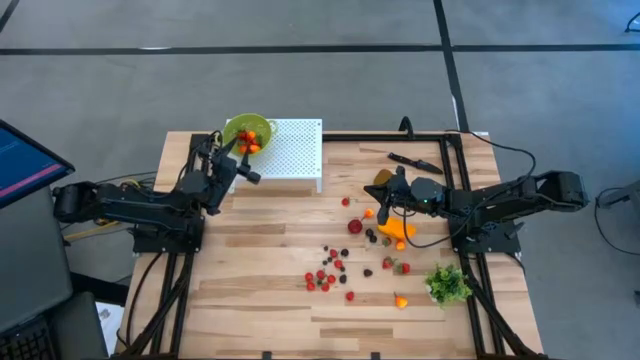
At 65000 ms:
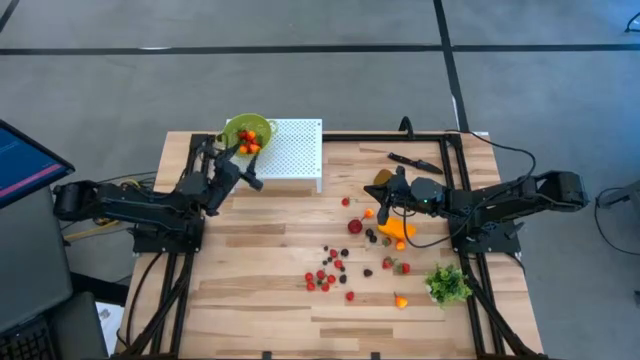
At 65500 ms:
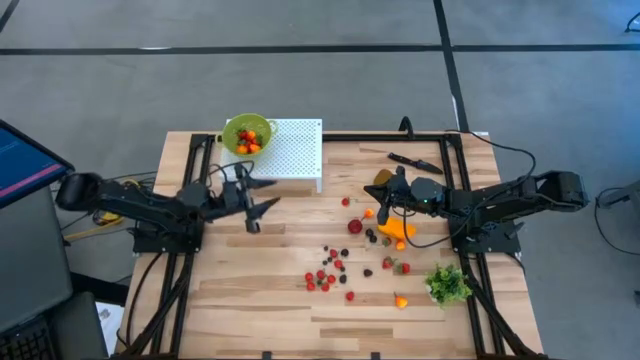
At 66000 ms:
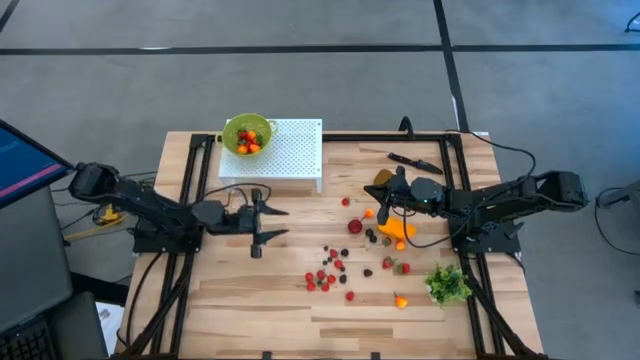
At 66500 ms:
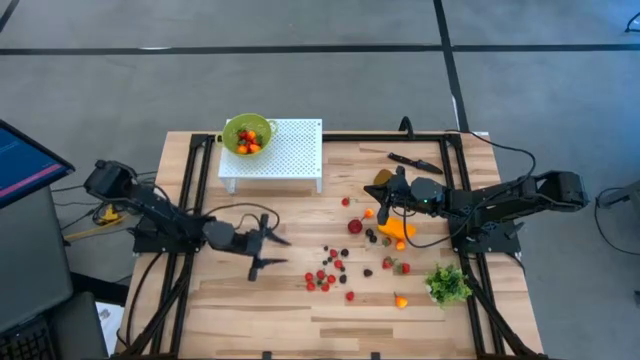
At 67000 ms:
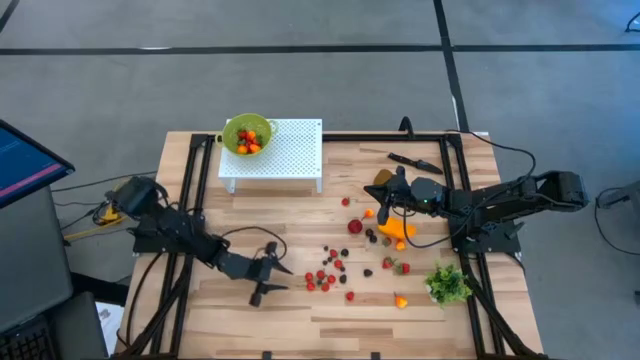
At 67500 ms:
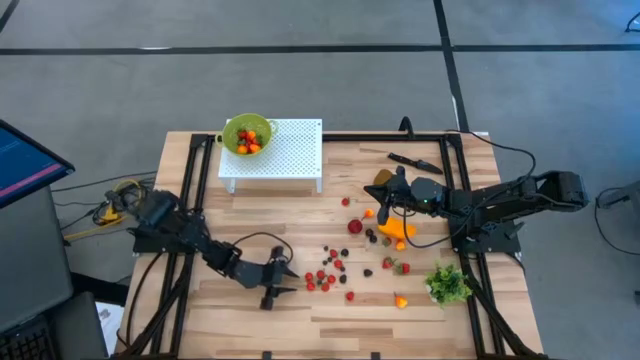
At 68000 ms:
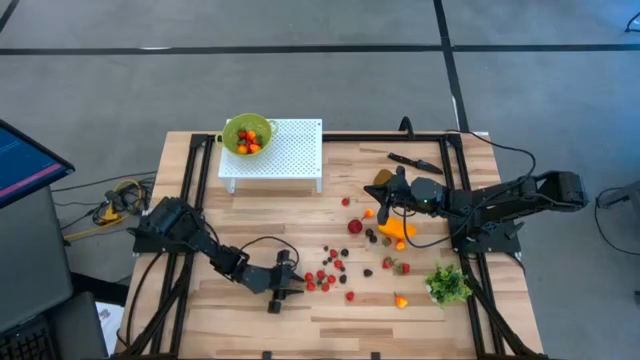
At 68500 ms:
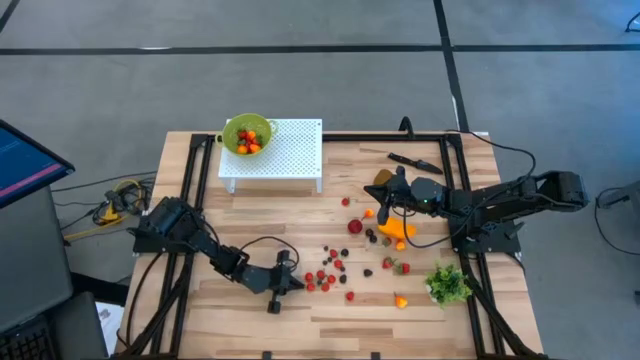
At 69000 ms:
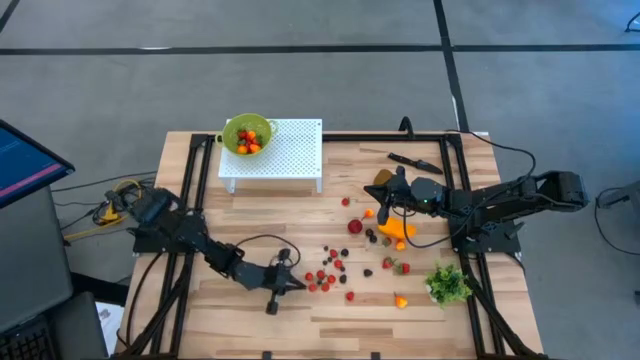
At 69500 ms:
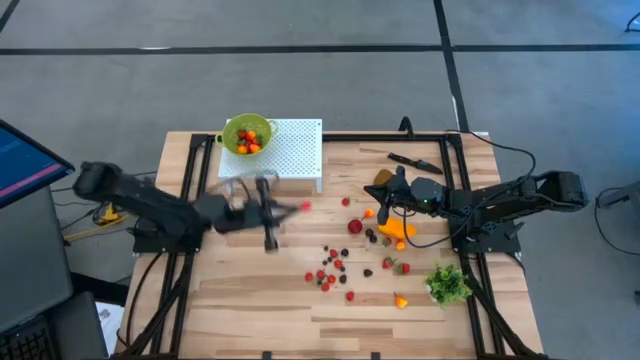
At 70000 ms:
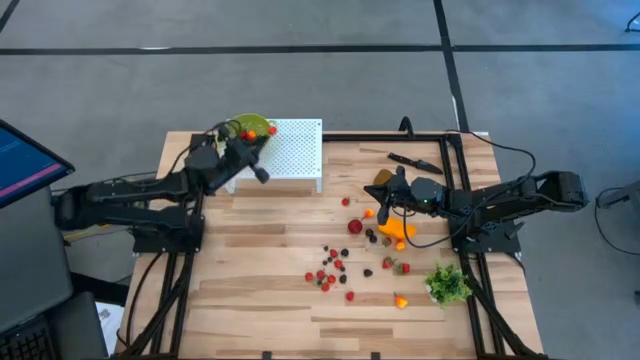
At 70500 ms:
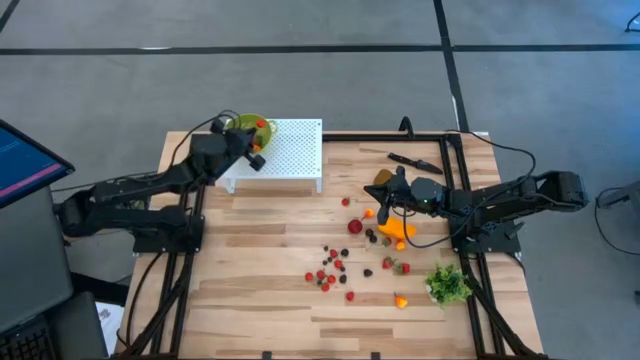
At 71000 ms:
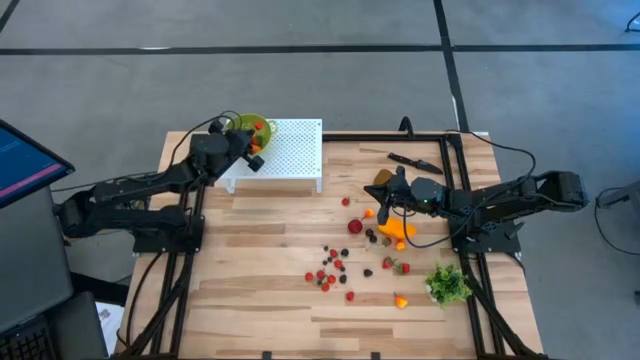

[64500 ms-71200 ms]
Task: Pick & Place Fruit
Put the red cherry into the green strainer bowl on the shelf

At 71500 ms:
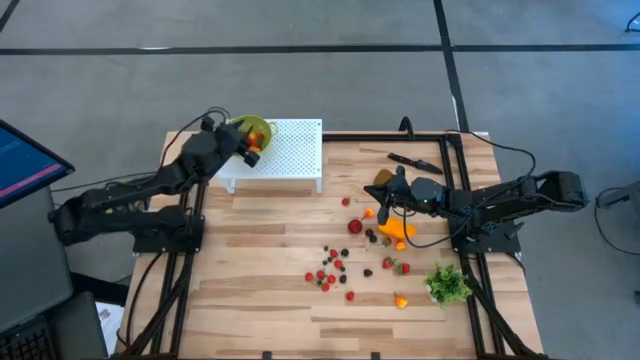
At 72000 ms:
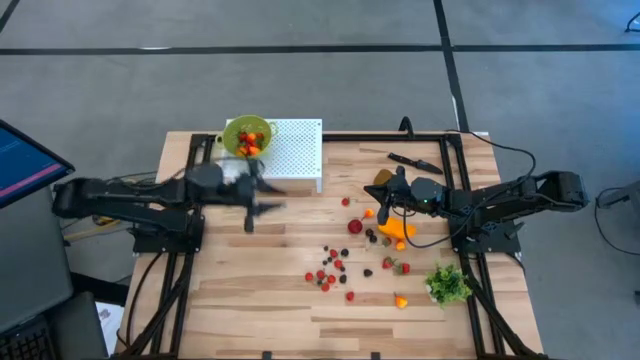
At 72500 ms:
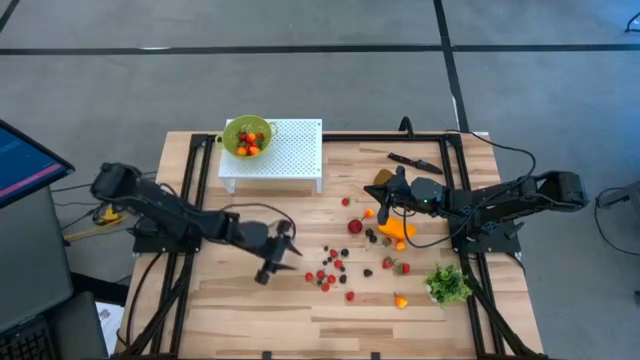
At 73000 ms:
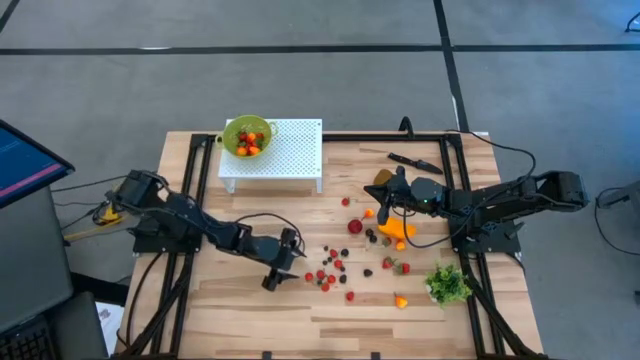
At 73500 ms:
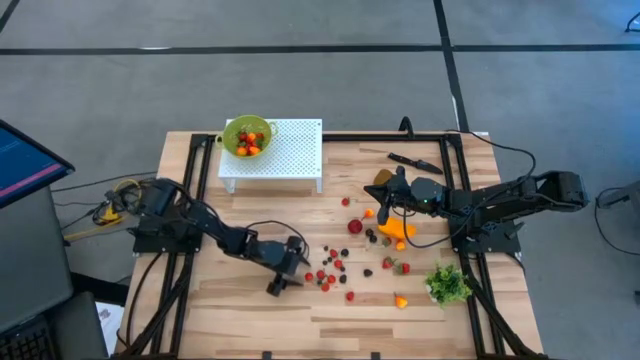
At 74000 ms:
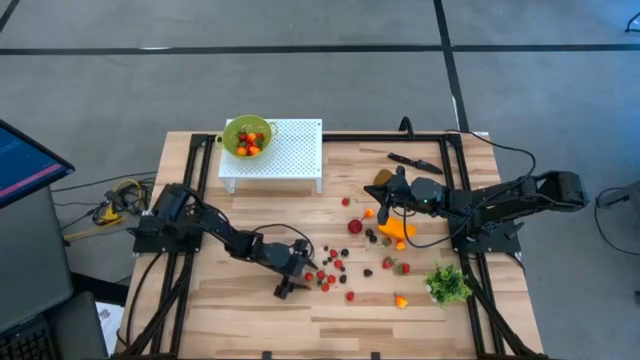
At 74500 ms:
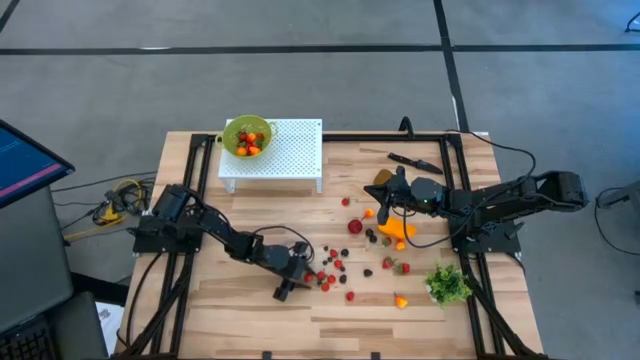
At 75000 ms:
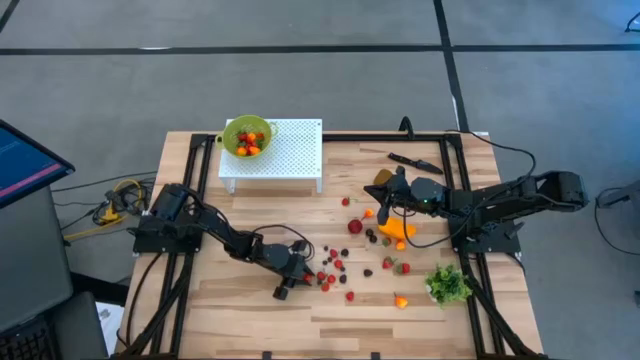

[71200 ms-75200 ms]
Put the red cherry into the green bowl on the shelf

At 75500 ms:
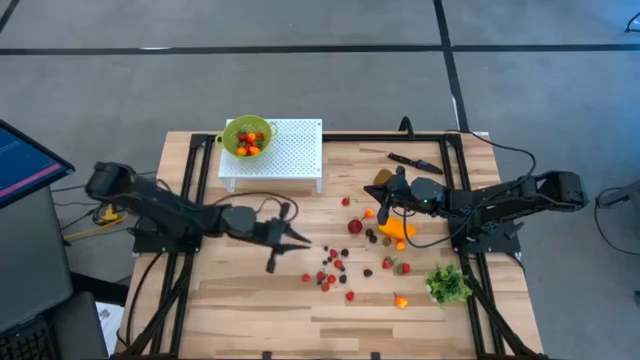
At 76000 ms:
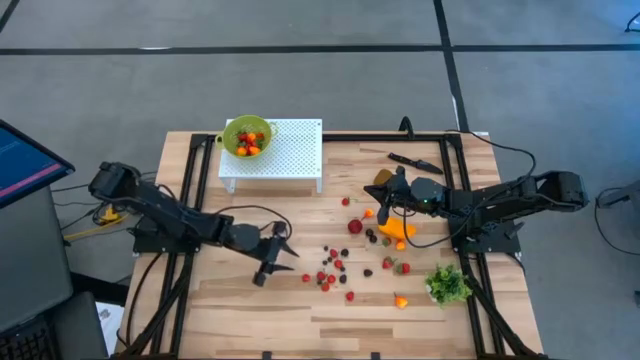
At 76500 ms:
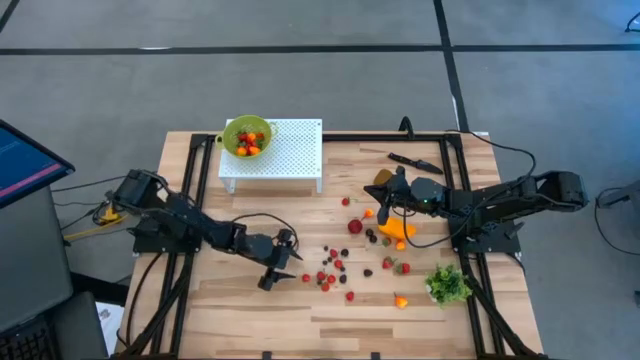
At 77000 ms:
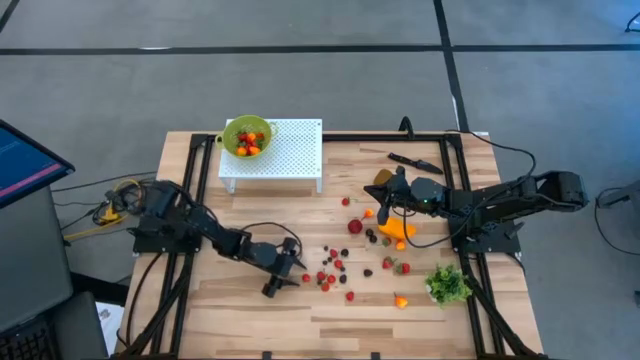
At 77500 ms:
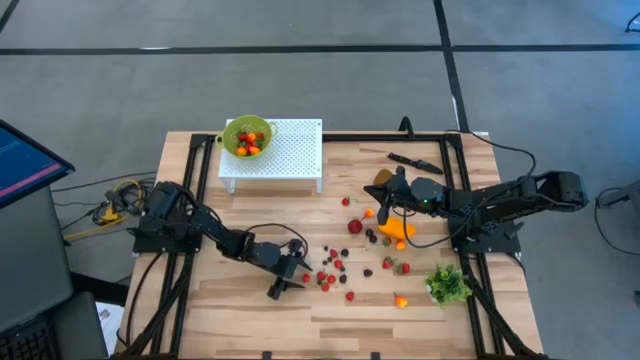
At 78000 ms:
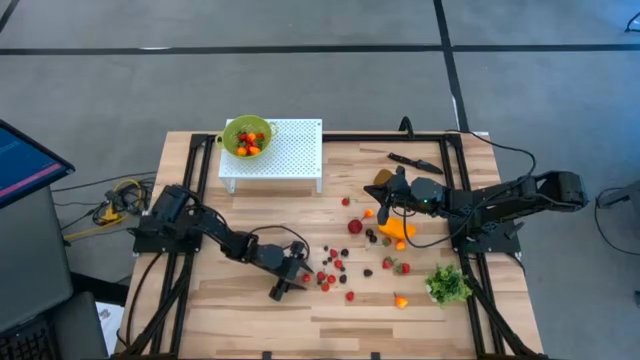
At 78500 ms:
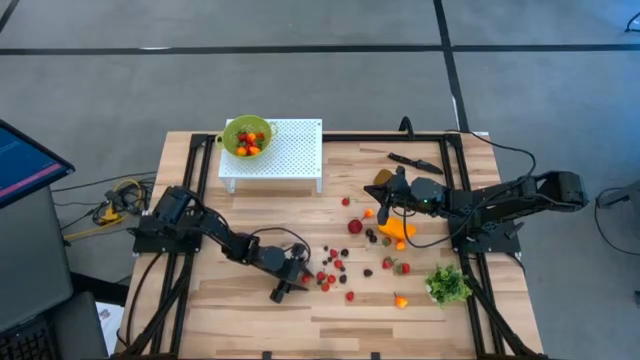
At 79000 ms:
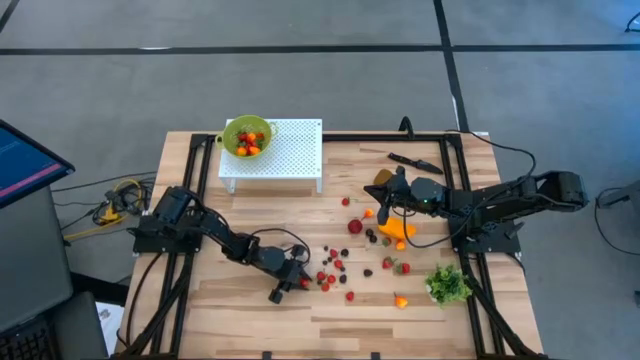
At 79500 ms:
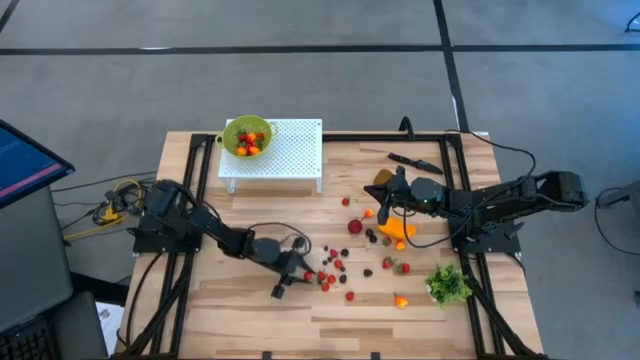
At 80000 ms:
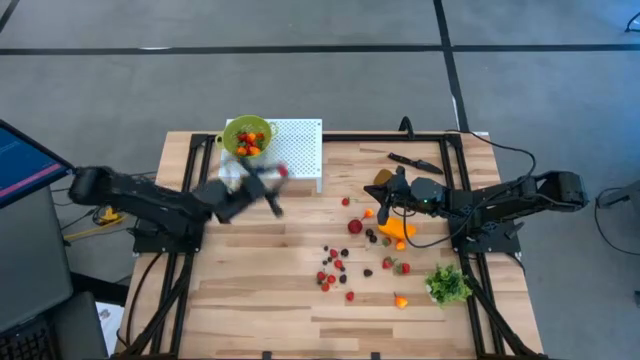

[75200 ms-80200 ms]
Put the red cherry into the green strainer bowl on the shelf

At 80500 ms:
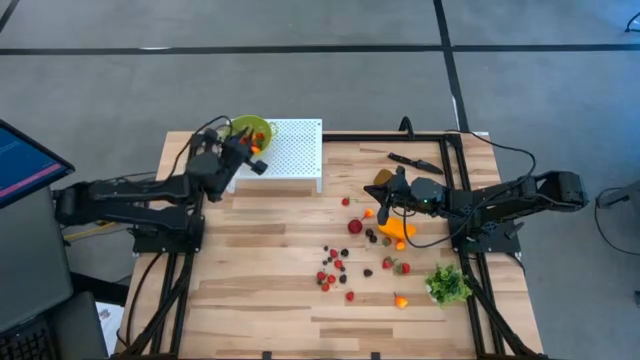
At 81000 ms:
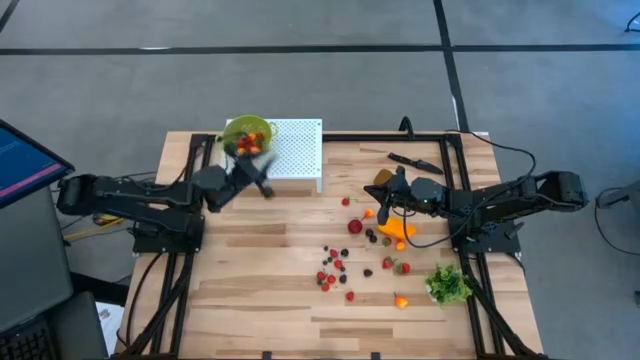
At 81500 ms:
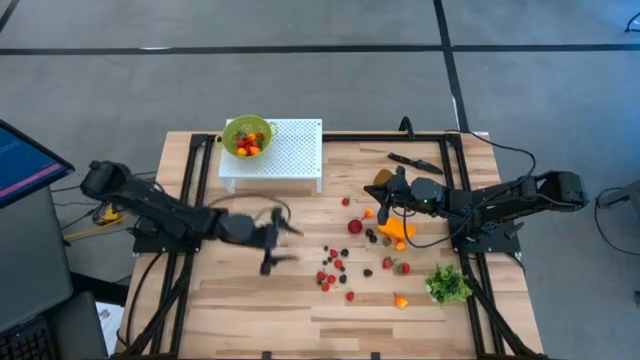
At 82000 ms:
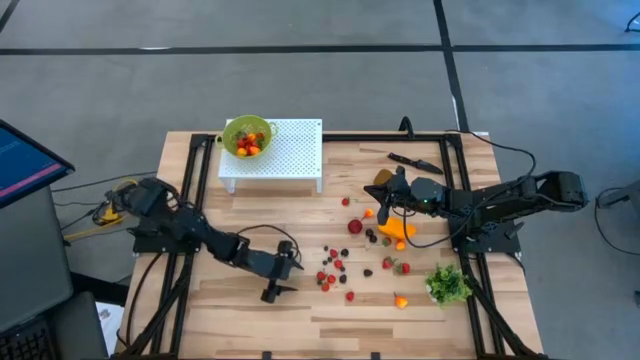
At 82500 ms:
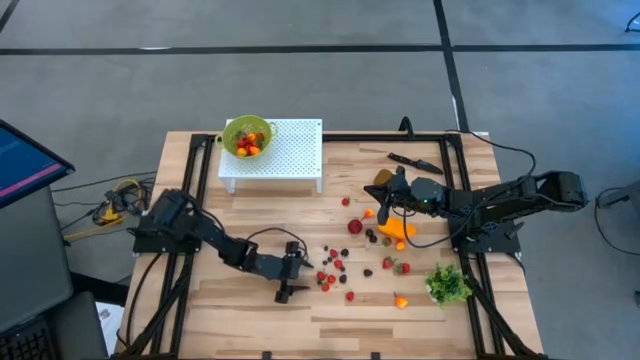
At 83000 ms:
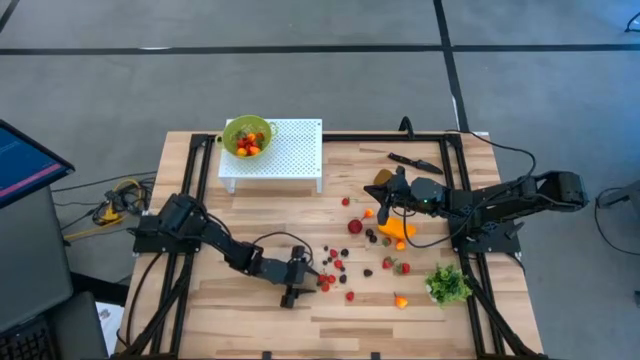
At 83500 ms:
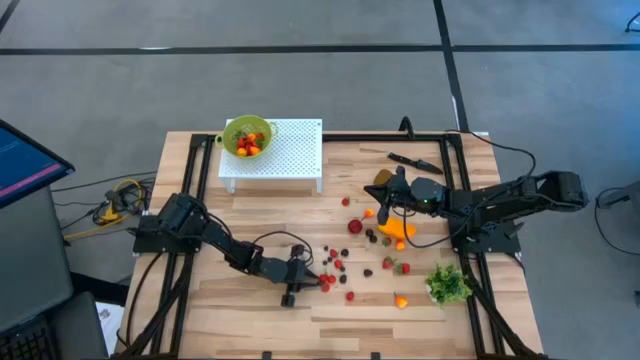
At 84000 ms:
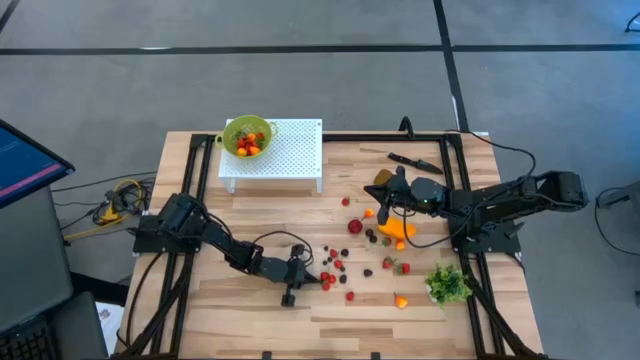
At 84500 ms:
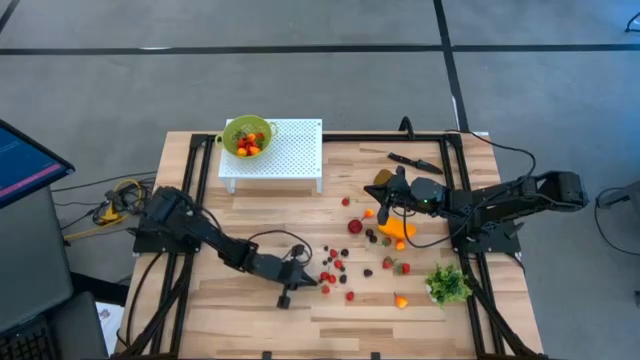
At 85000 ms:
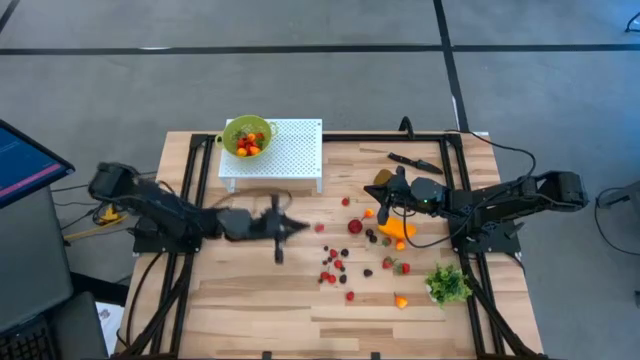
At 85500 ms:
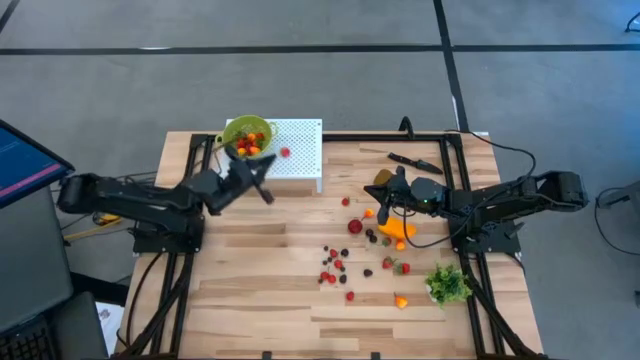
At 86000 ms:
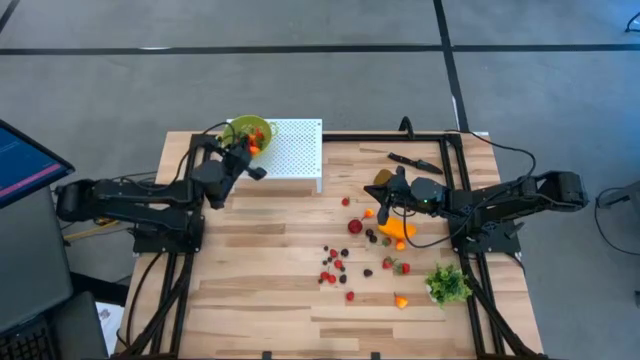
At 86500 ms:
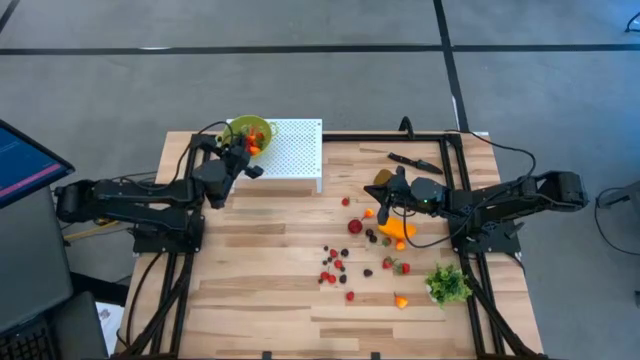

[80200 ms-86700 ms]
Put the strawberry into the green strainer bowl on the shelf
